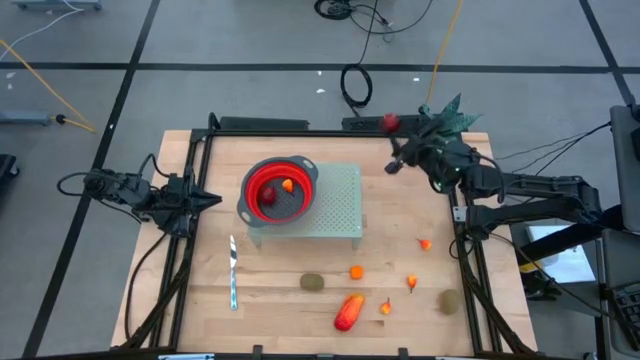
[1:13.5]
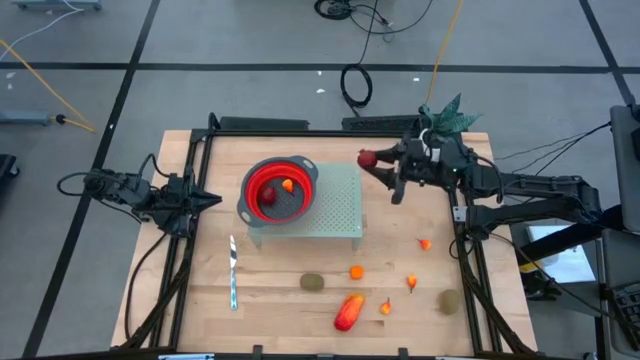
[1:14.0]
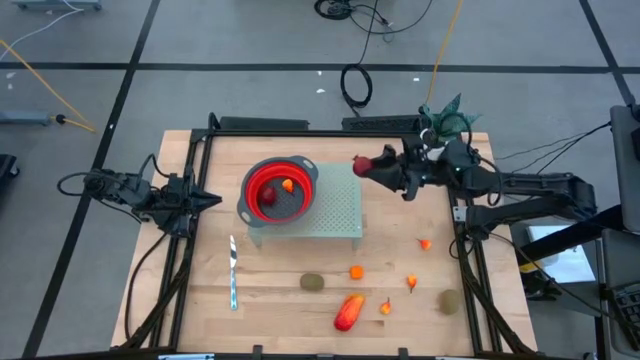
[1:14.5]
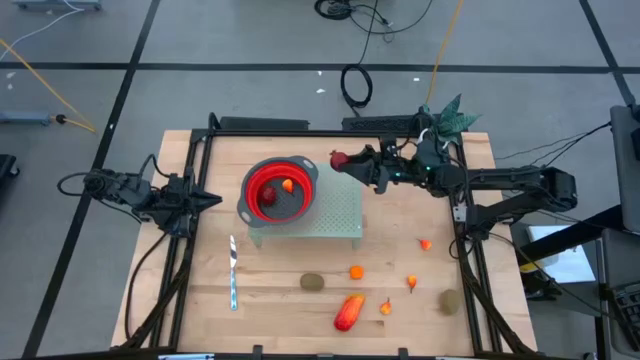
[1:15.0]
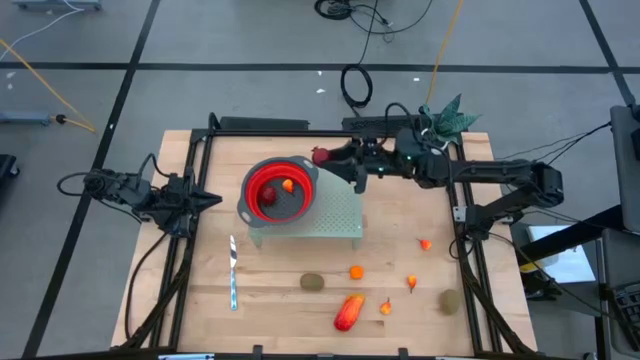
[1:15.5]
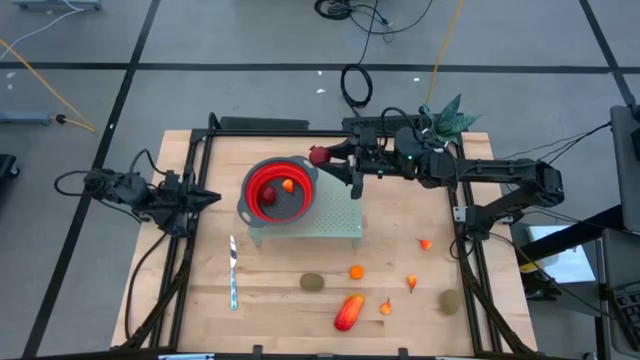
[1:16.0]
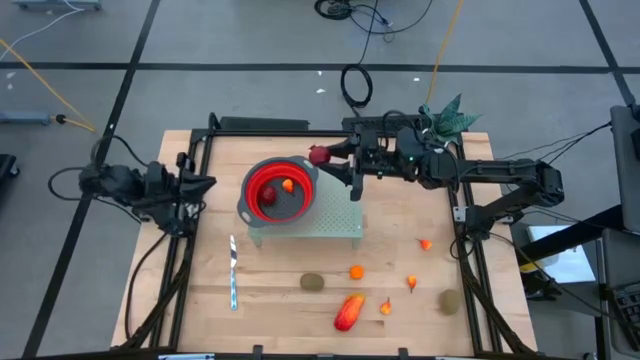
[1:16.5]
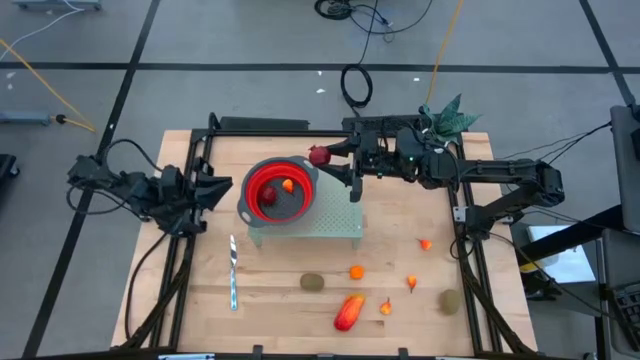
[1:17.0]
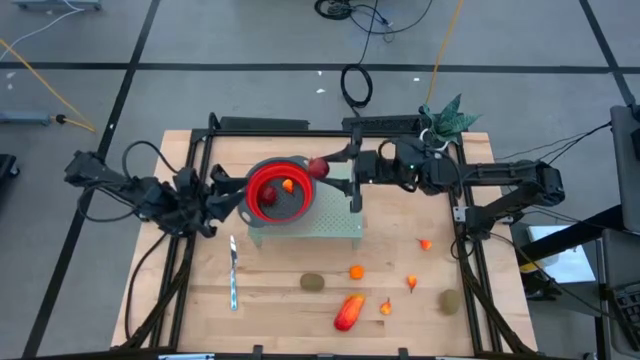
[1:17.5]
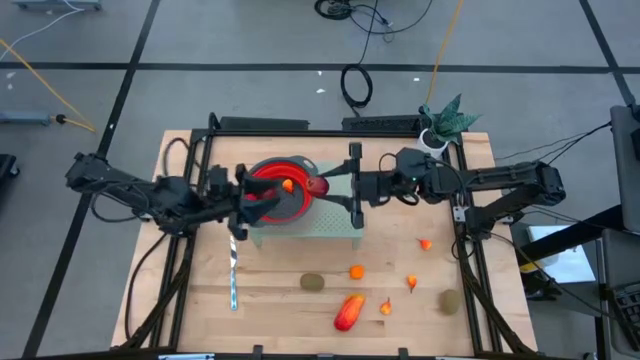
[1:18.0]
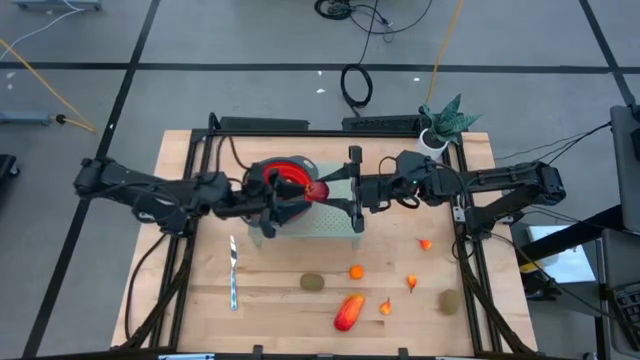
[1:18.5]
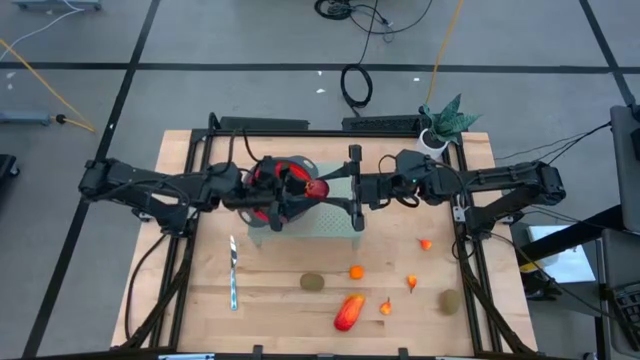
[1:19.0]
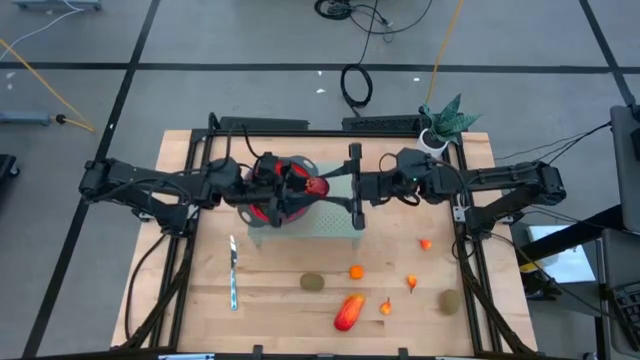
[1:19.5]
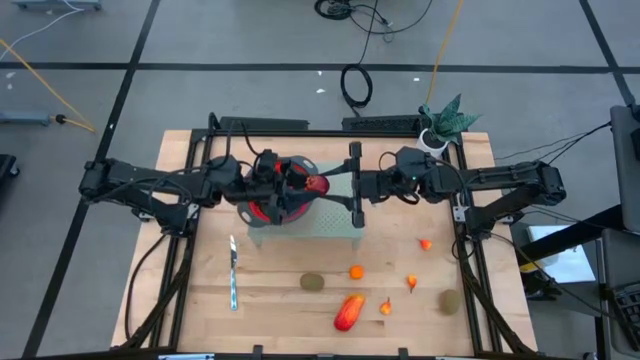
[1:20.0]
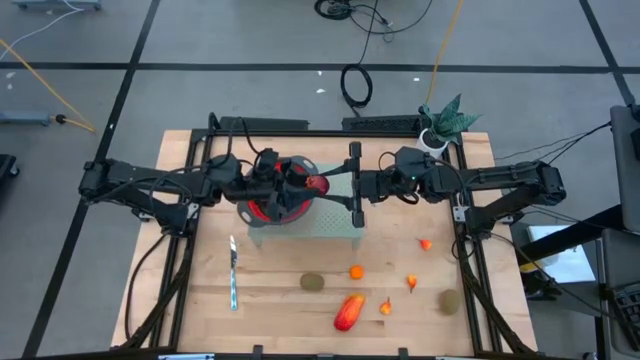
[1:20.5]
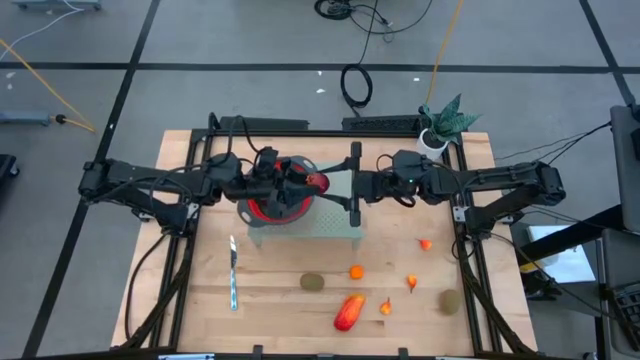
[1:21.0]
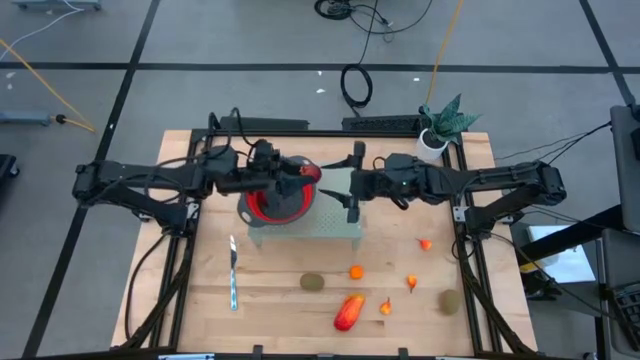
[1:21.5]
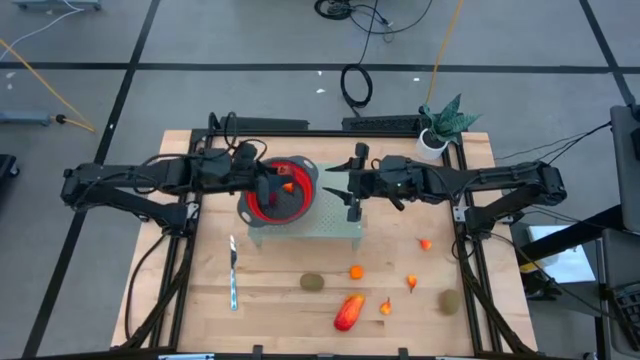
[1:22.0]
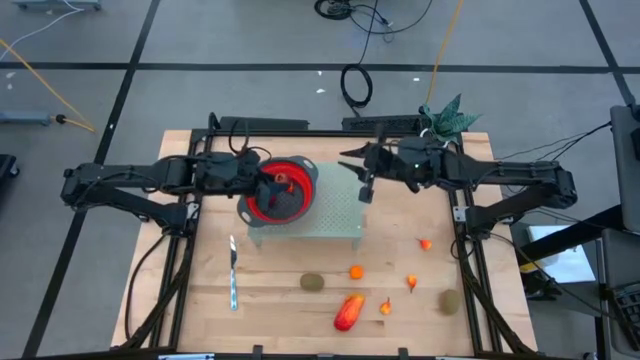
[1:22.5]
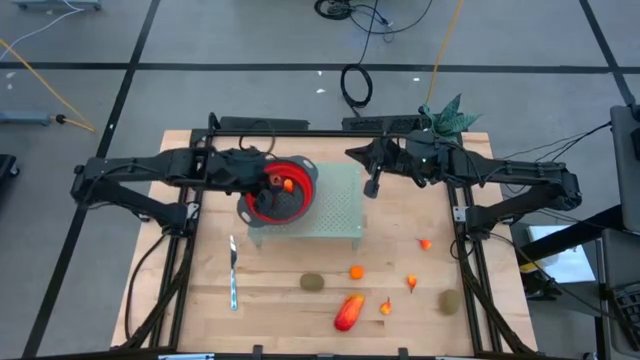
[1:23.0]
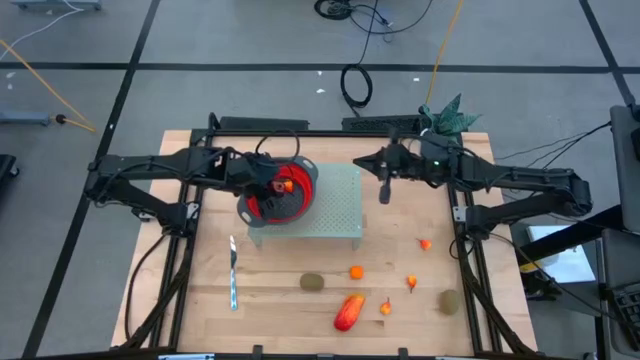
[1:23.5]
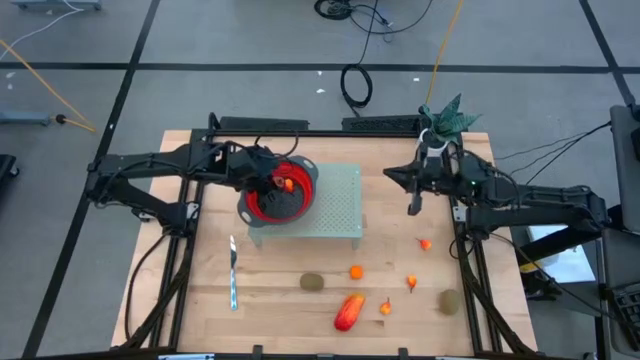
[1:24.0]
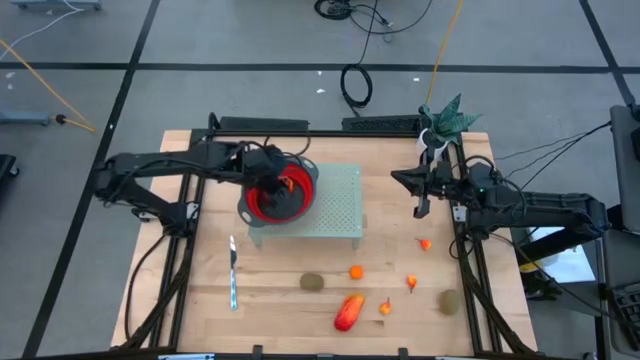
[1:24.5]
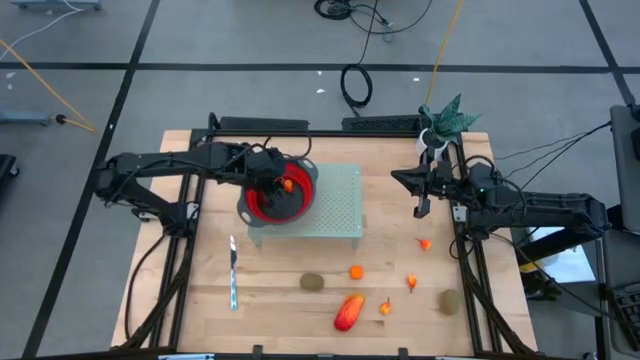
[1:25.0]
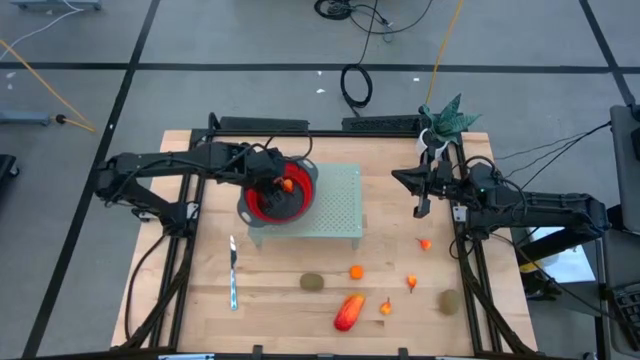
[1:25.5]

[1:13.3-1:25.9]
Task: Pick & Place Fruit
Put the pomegranate into the strainer bowl on the shelf

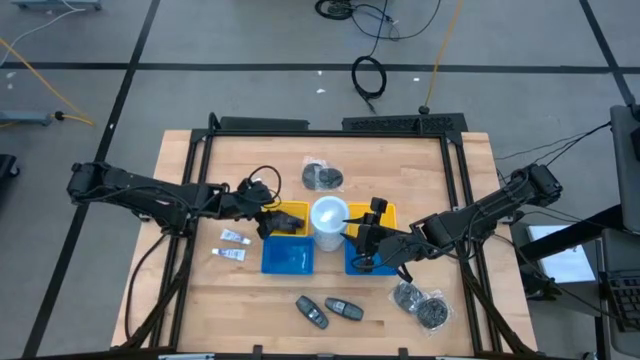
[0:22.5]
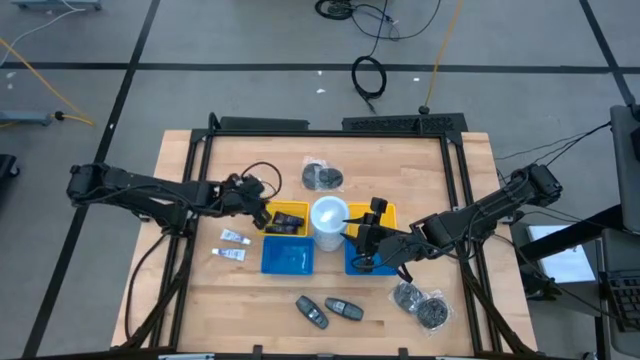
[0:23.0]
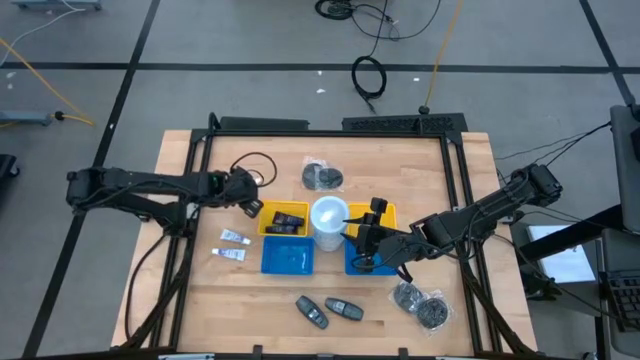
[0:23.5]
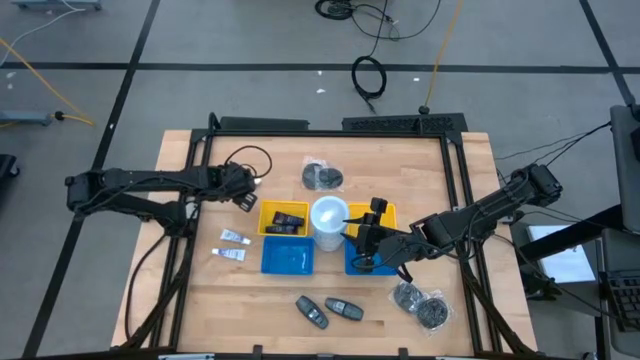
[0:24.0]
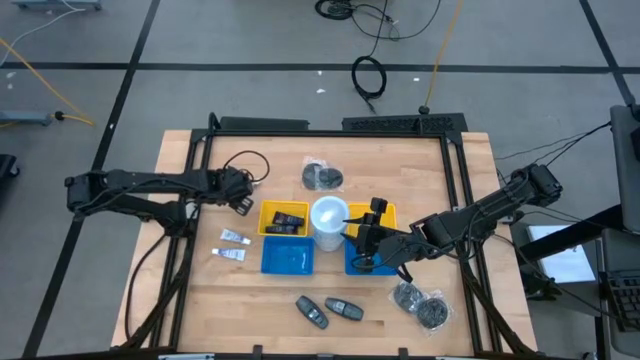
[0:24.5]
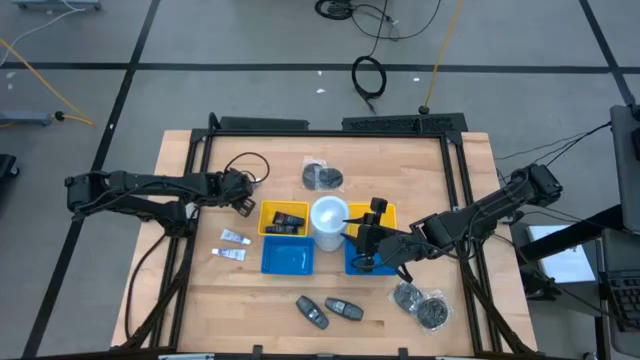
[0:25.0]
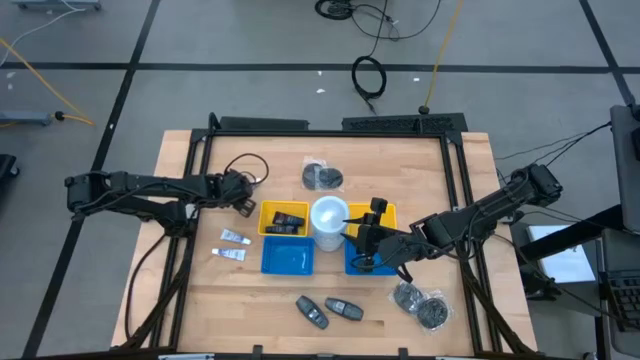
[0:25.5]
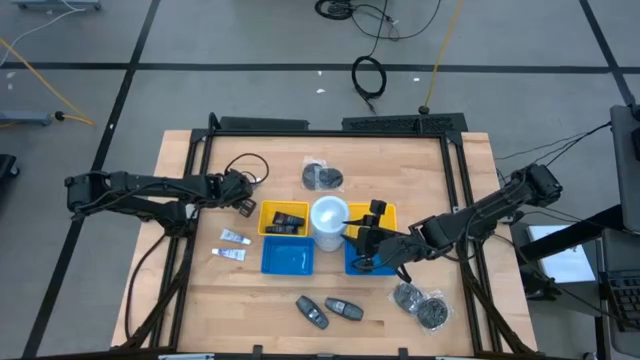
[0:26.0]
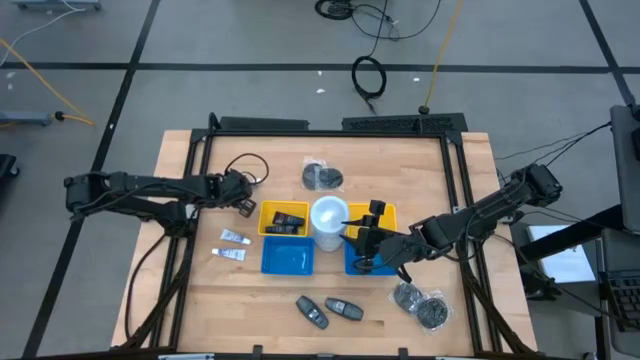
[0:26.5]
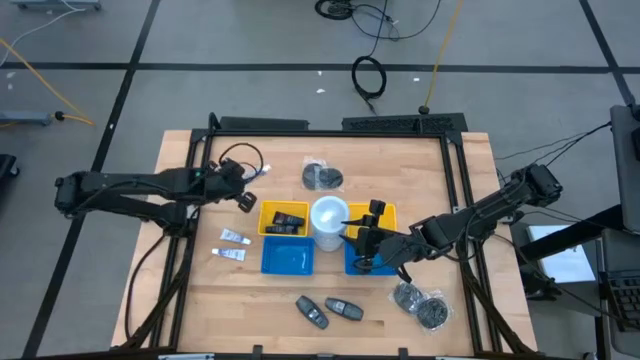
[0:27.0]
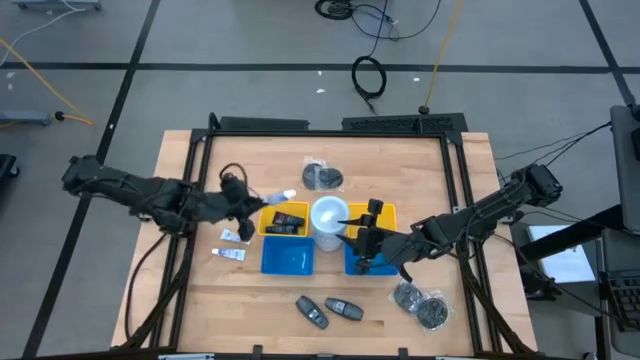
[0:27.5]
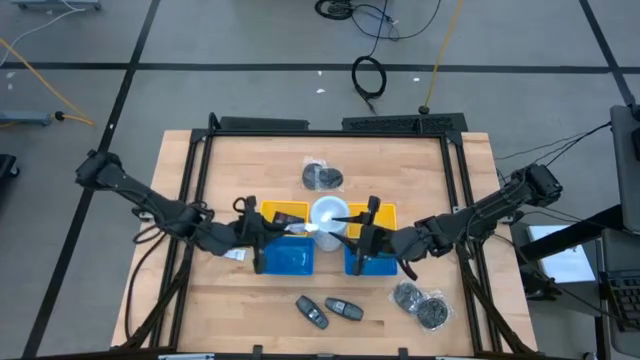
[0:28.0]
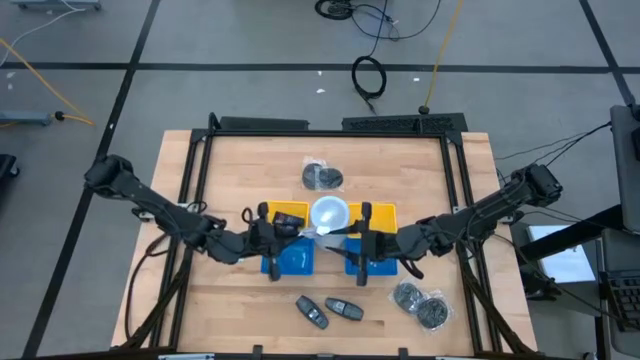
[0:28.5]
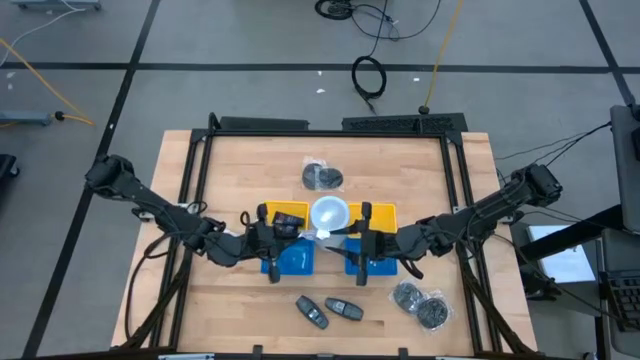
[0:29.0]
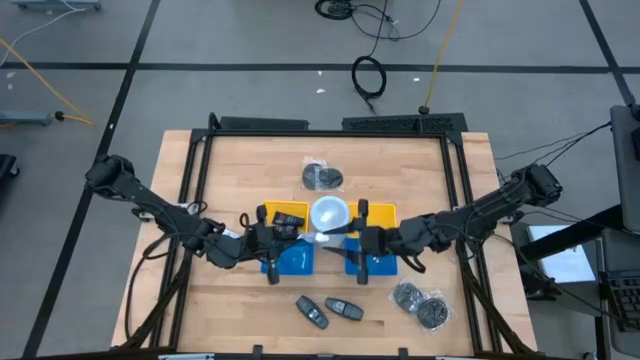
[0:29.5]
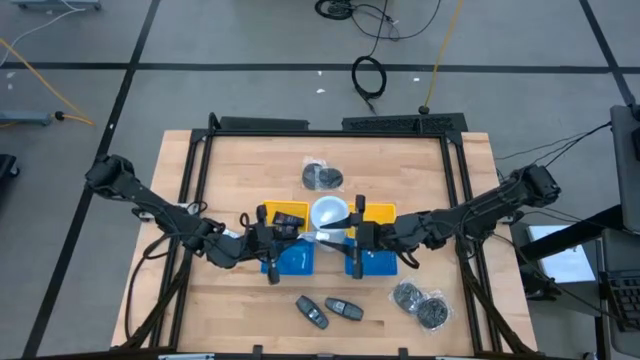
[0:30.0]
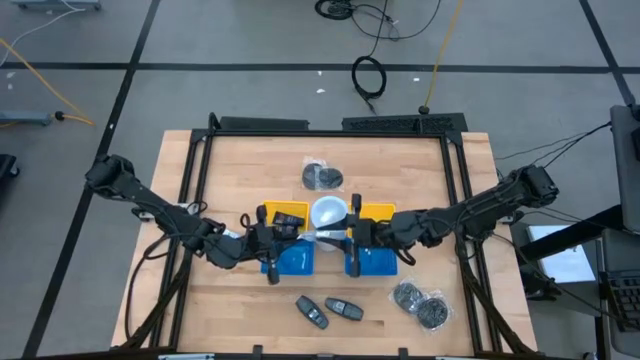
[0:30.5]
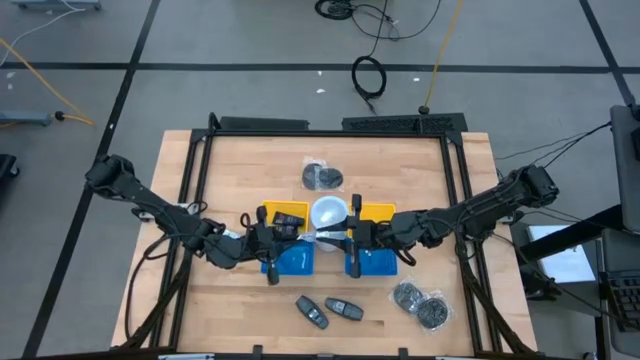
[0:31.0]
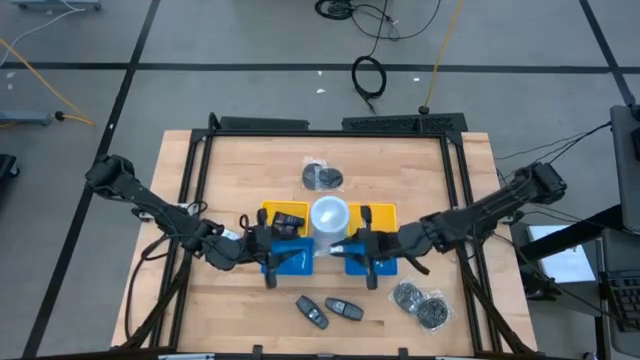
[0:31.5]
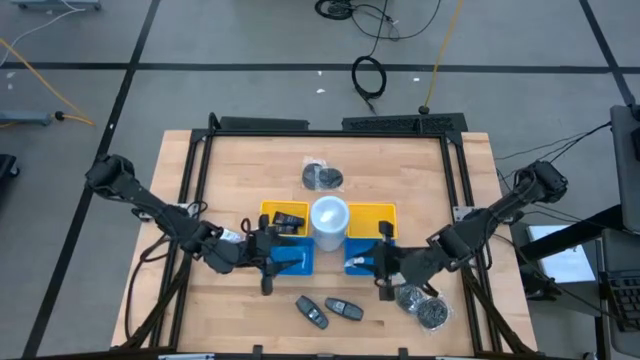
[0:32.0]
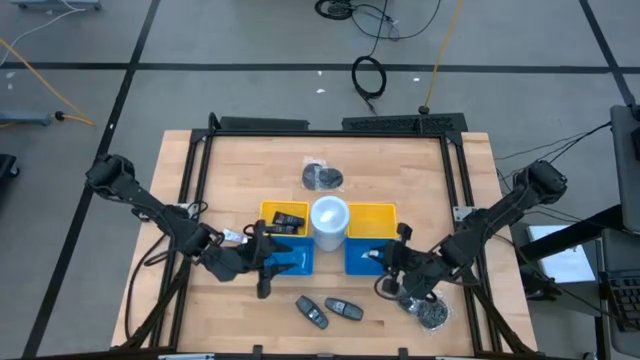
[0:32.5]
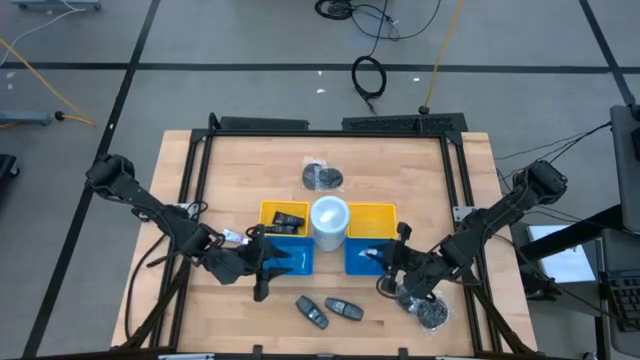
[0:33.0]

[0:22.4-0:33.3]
Task: Pick & Place Travel size toiletries
Put the toothpaste into the right blue bin
